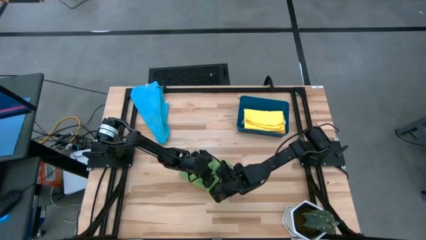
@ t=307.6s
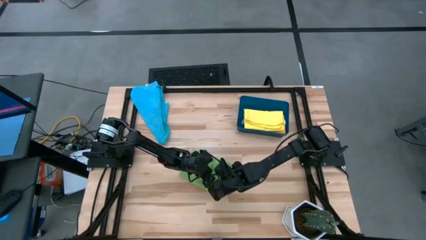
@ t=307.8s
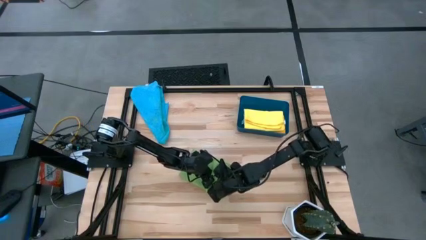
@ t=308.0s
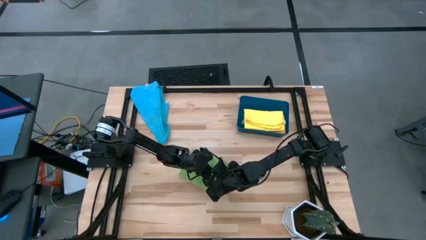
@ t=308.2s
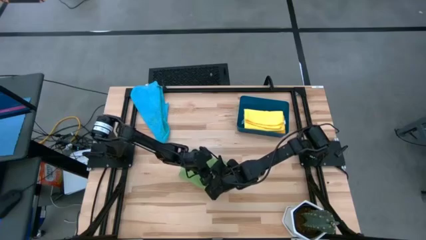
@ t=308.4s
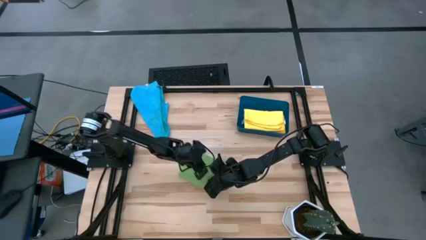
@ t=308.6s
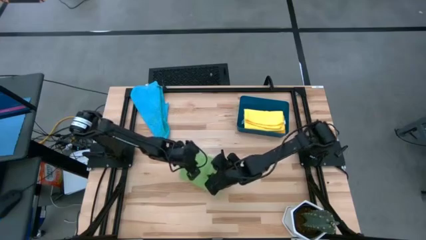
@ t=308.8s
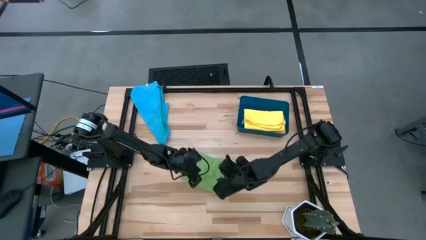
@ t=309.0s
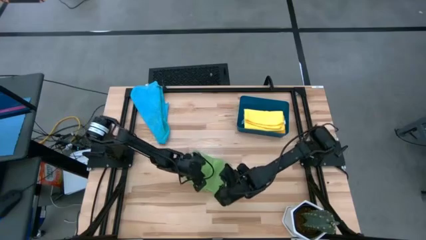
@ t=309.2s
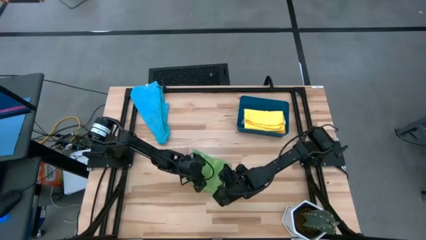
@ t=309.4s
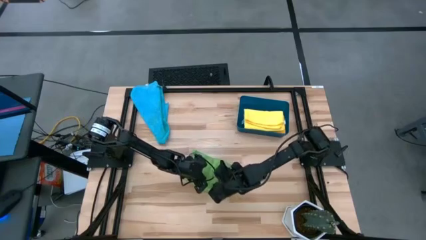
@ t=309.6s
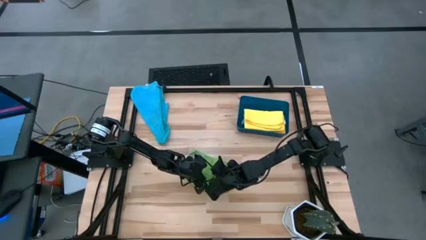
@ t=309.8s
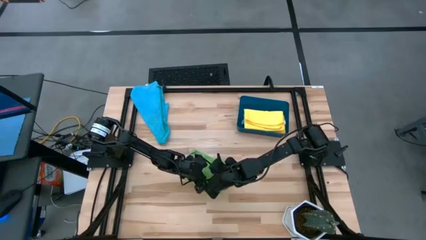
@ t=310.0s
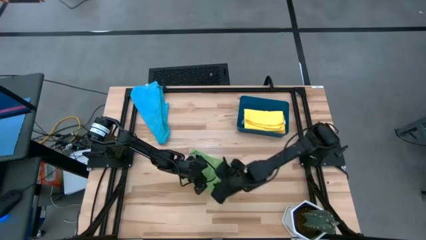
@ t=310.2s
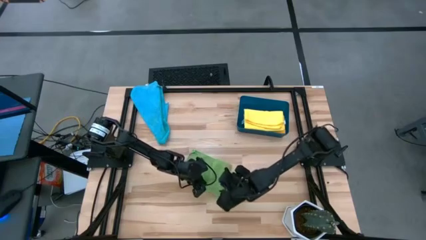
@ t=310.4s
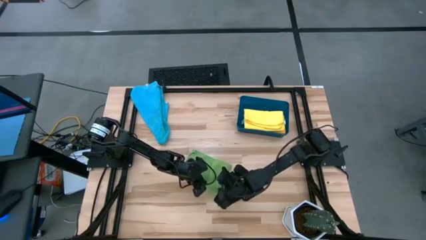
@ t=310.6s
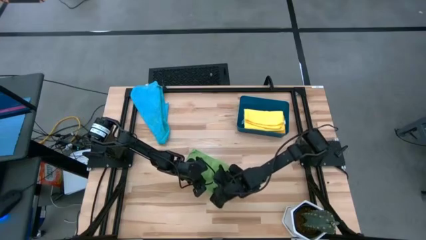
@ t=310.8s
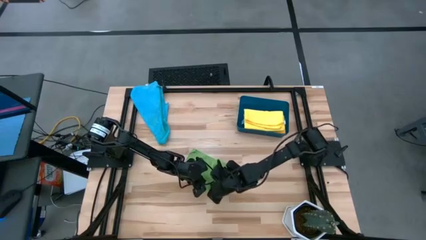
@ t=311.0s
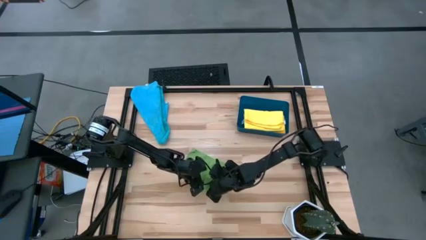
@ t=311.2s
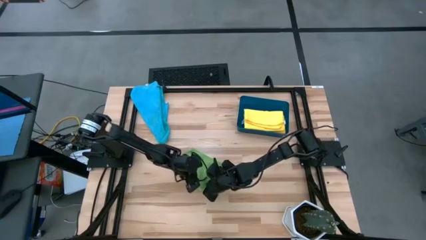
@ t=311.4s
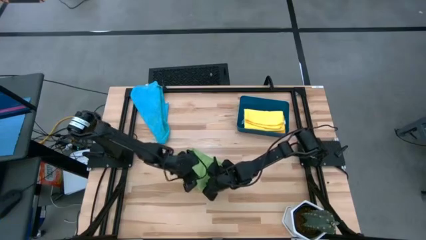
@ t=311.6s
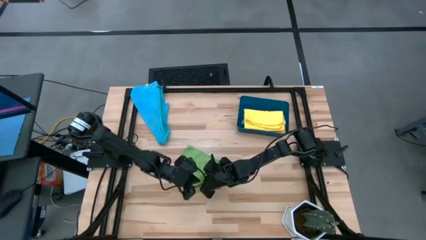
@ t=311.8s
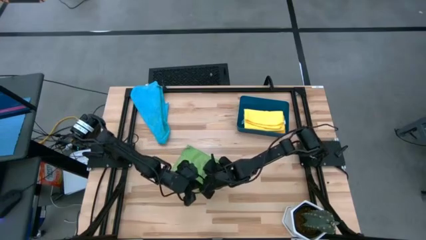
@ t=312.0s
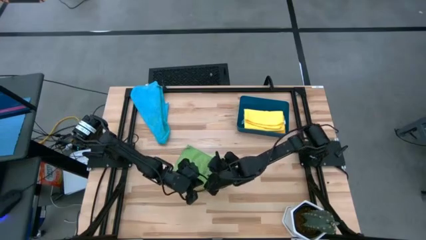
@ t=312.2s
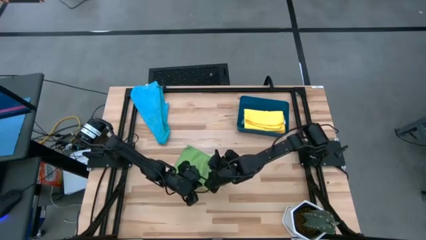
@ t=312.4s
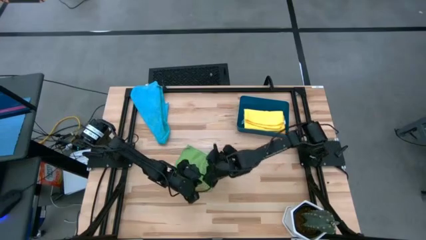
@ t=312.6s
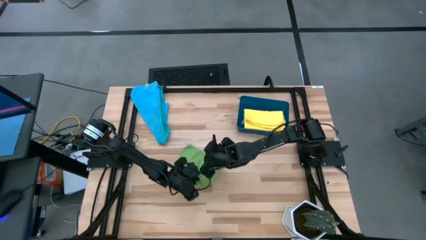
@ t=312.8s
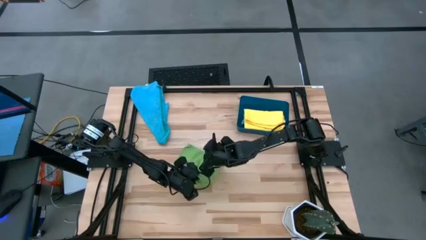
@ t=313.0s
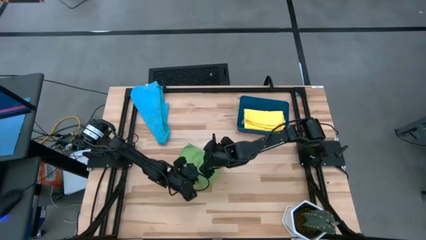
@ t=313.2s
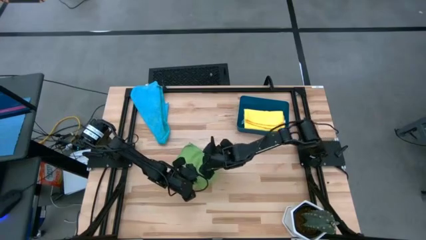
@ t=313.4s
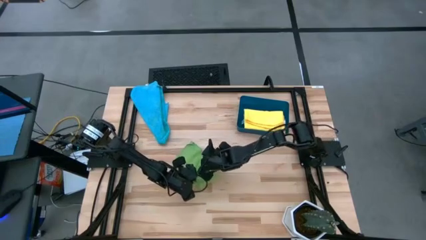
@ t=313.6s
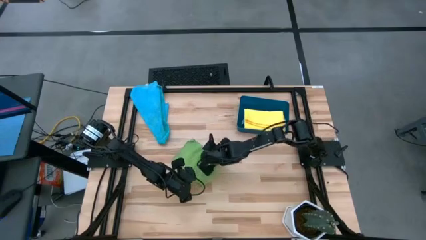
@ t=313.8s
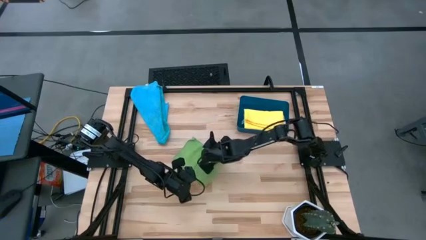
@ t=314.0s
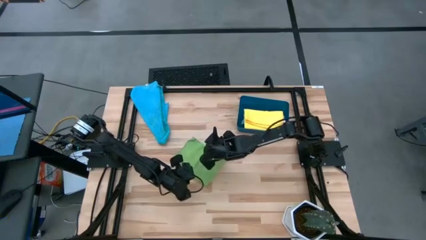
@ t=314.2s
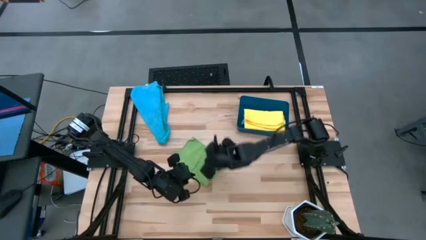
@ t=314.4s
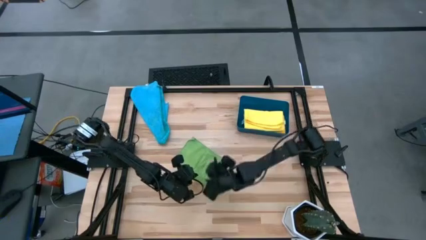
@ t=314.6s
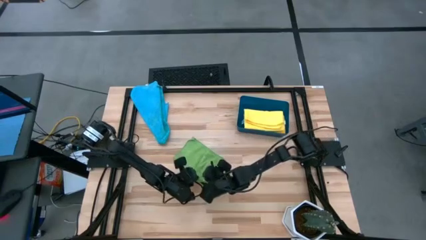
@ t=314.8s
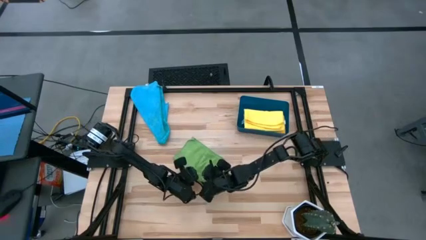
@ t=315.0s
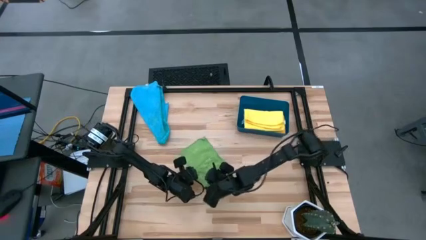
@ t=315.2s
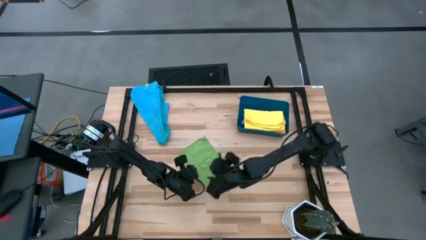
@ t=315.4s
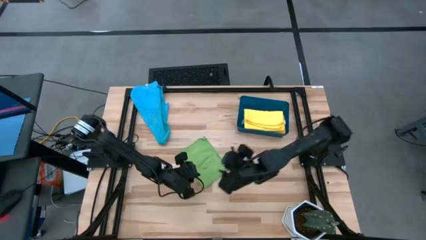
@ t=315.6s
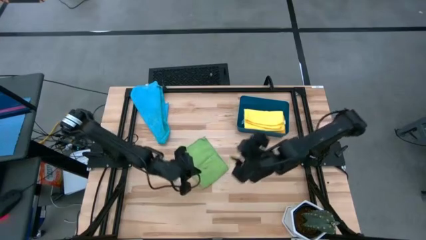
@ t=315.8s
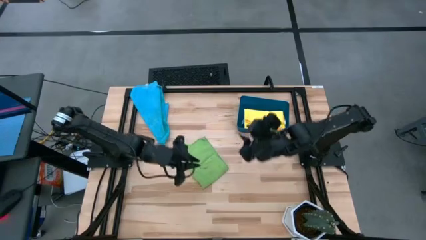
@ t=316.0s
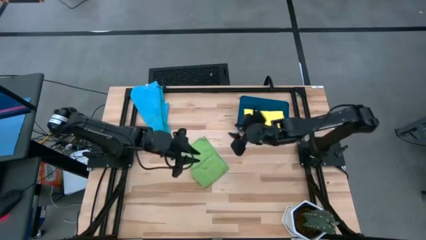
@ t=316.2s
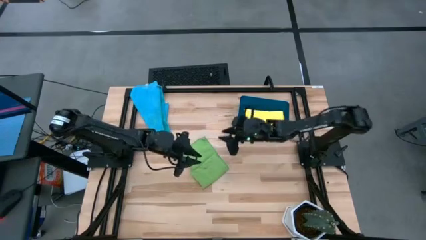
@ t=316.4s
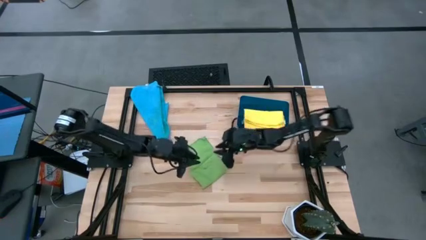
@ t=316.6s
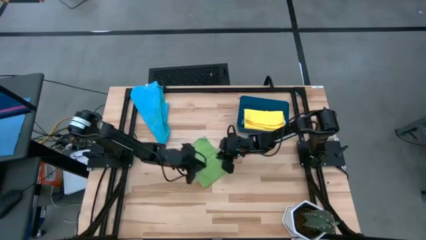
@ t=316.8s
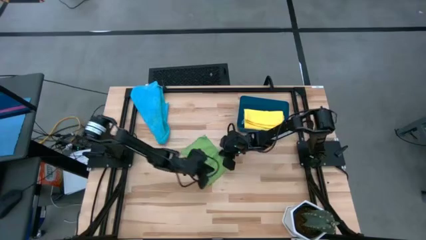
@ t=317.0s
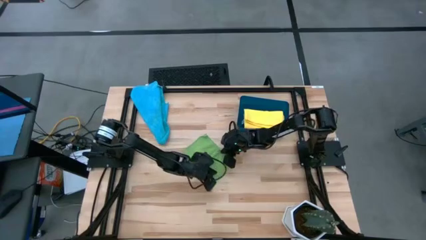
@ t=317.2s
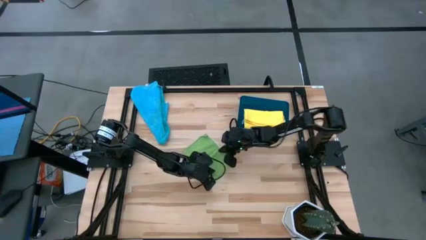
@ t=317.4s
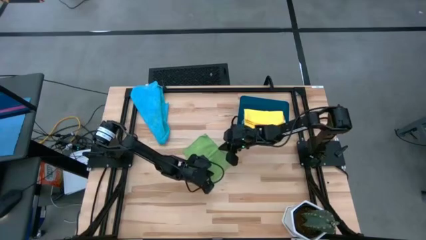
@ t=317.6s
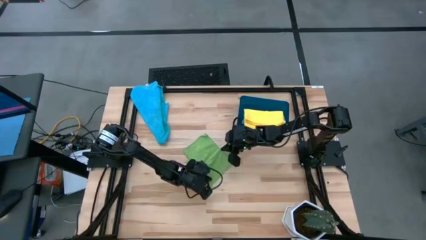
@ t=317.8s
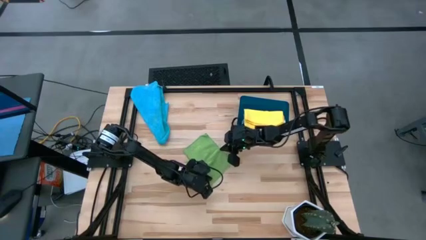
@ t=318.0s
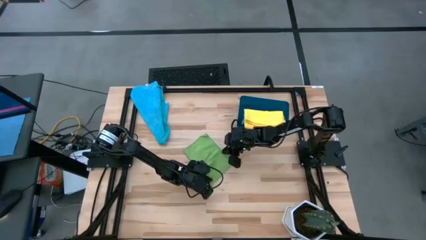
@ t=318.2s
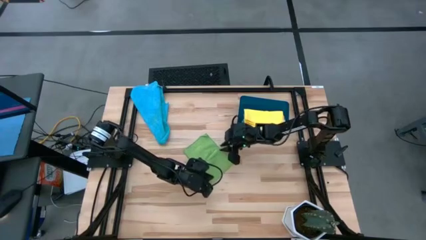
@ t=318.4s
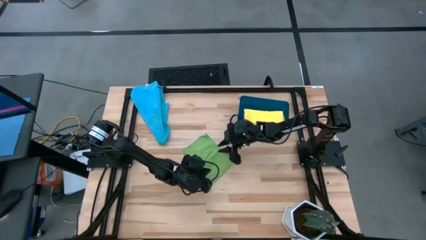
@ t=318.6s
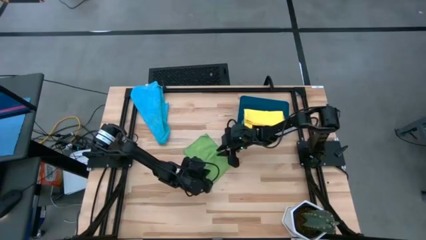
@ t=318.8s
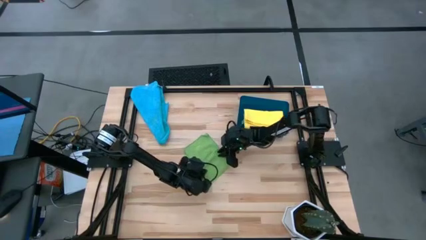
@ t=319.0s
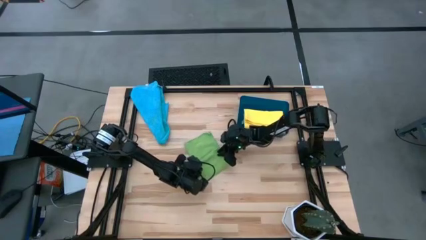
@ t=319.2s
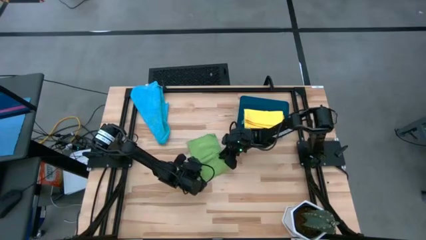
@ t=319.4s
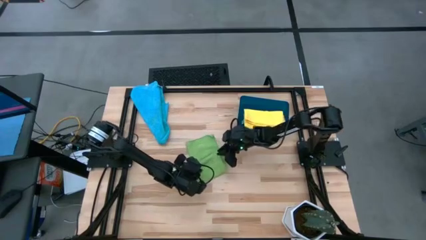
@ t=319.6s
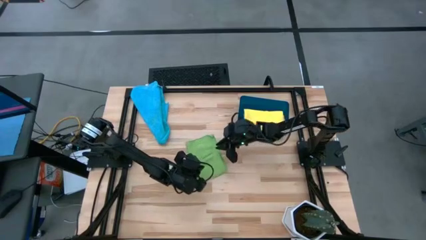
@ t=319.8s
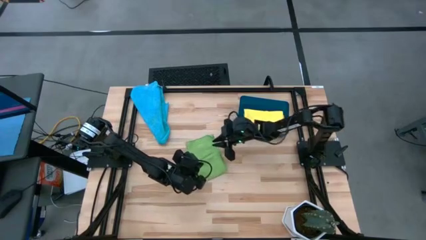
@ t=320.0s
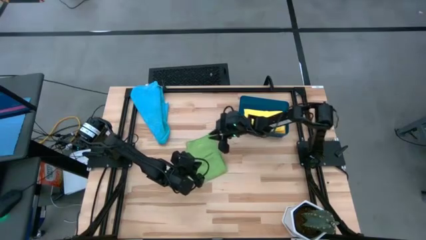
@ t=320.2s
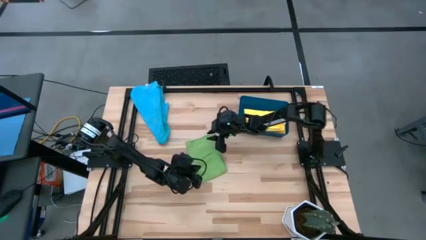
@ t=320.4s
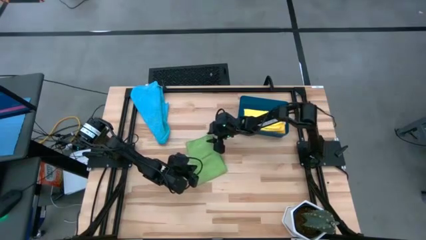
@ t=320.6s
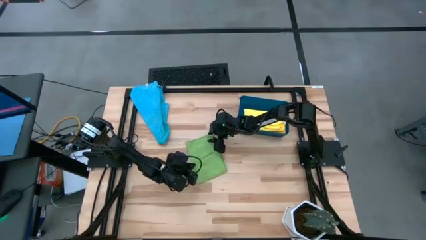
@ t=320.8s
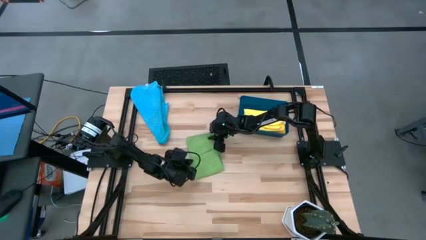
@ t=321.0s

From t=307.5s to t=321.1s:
Task: Fold microfiber towels
Fold the green microfiber cloth

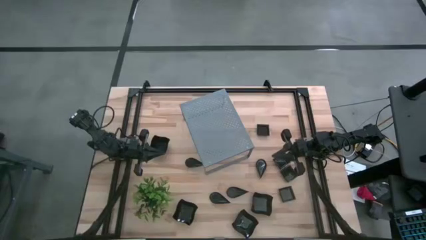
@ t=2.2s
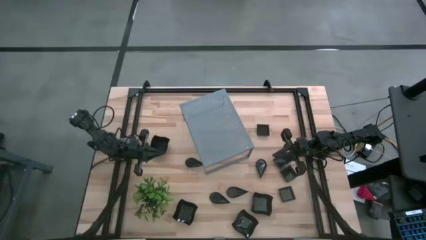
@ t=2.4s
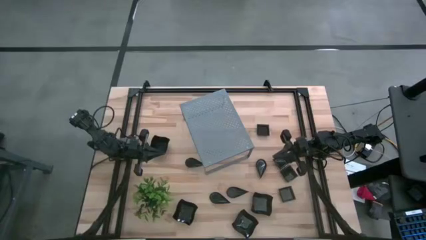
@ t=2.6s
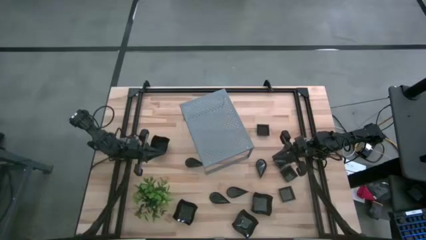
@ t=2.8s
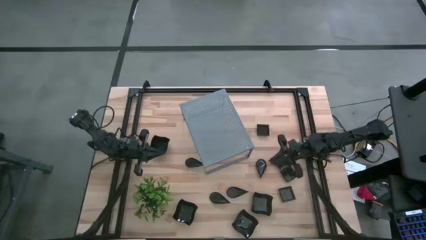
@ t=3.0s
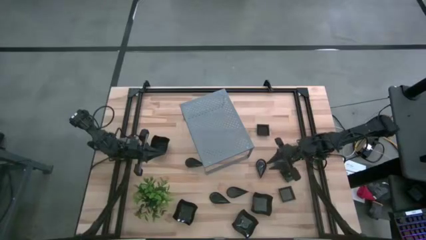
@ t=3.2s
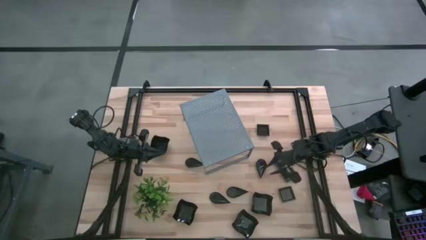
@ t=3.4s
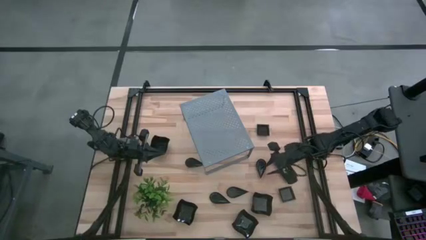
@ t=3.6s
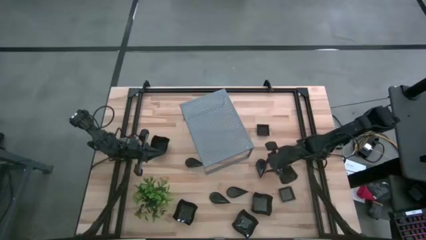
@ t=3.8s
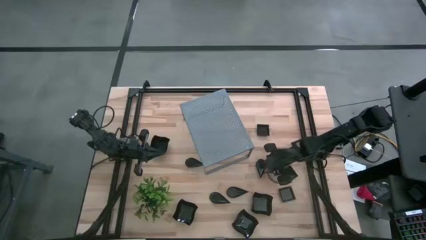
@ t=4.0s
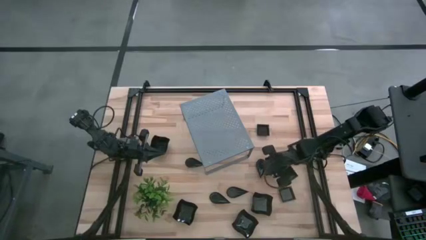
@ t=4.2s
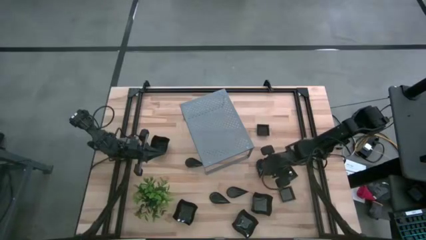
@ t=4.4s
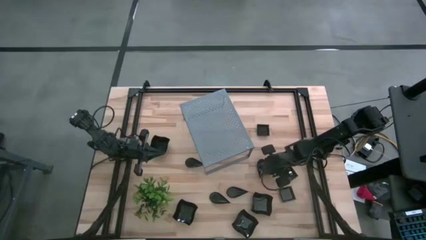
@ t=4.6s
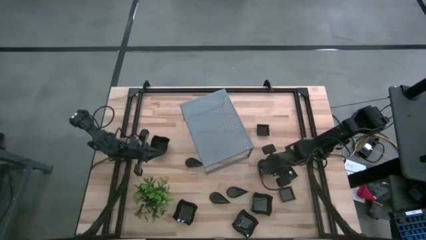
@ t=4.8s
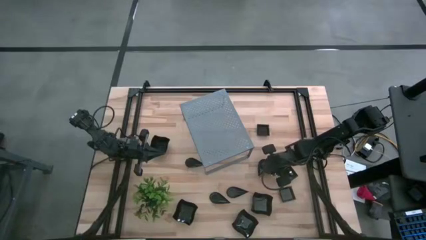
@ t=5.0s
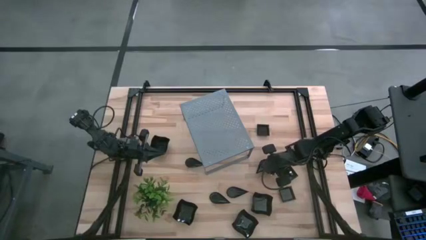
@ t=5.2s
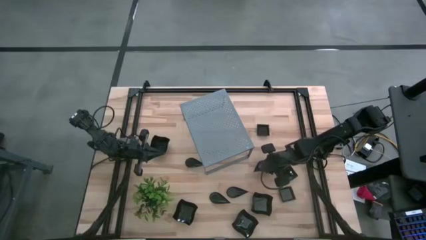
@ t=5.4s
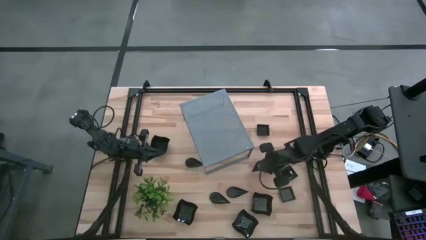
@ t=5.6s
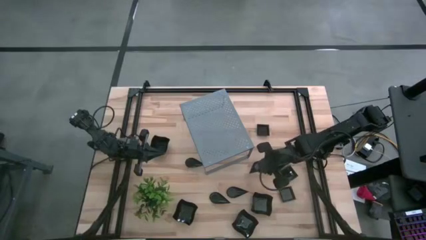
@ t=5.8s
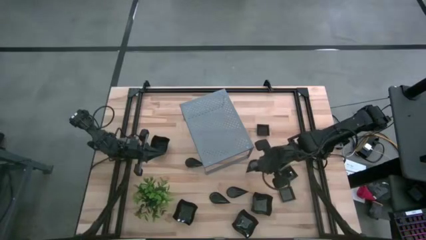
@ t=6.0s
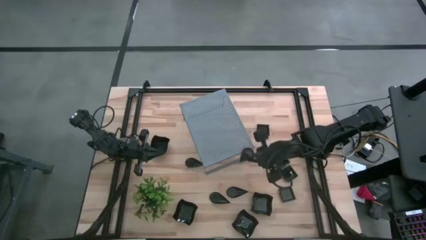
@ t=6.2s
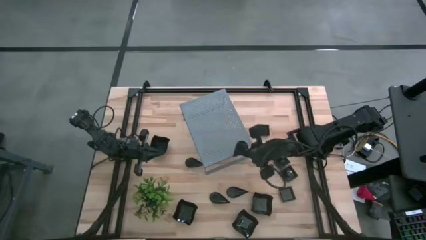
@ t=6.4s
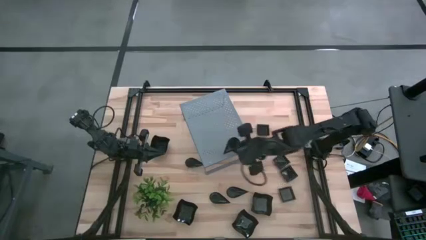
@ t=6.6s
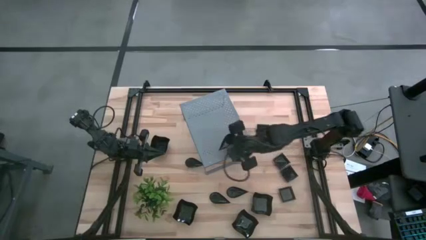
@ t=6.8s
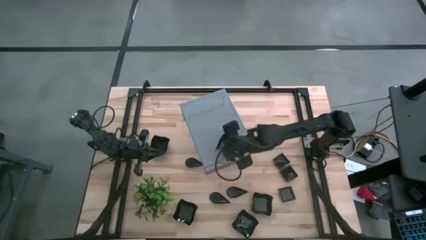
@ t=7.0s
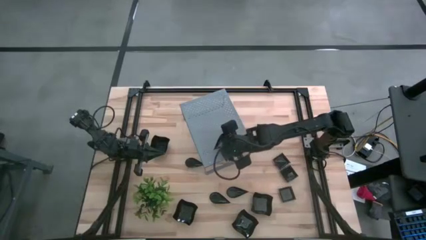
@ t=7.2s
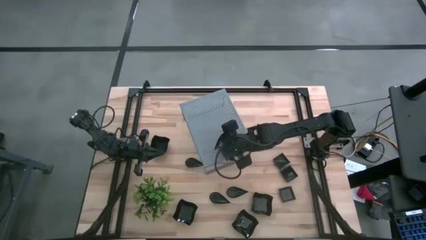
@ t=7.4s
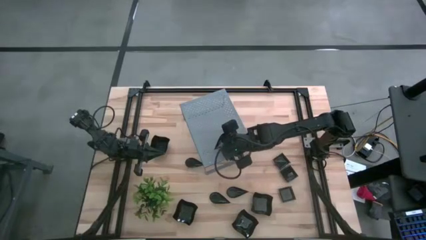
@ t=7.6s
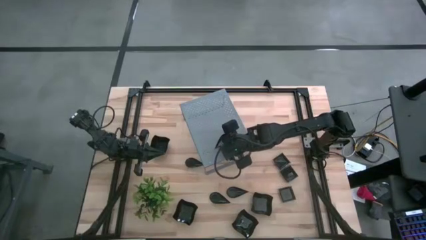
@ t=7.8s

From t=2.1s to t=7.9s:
Task: Pick & Place Mini shaped plates
Put the drop-shaped plate on the shelf
